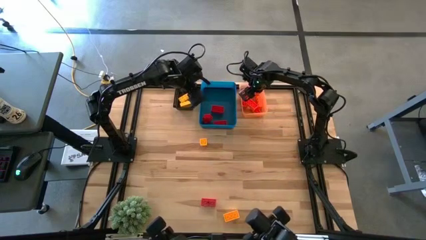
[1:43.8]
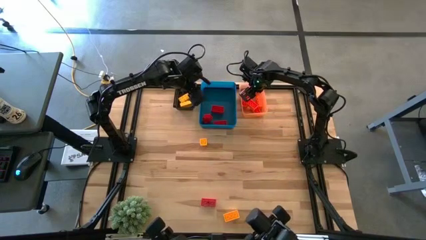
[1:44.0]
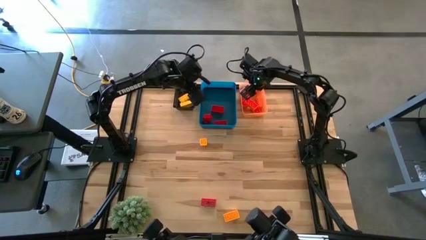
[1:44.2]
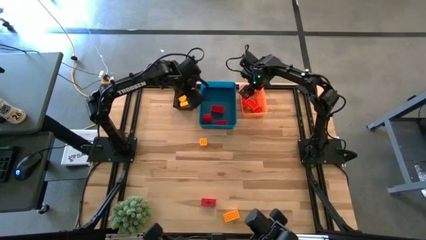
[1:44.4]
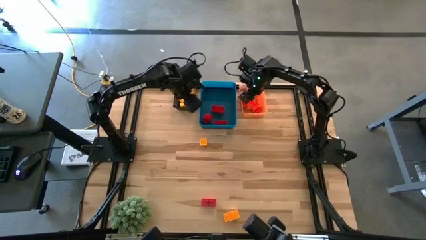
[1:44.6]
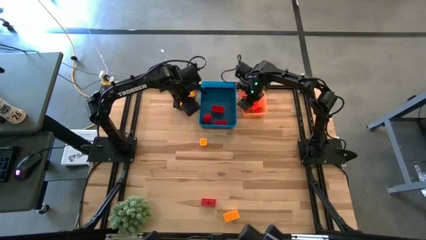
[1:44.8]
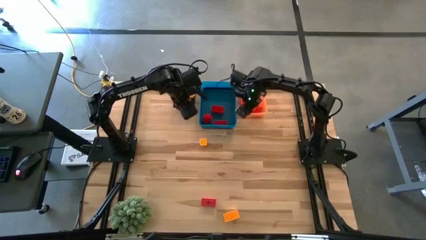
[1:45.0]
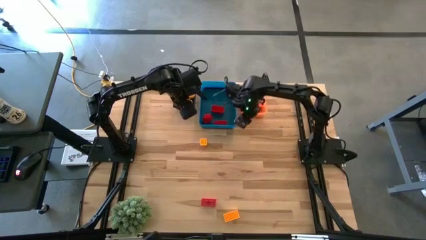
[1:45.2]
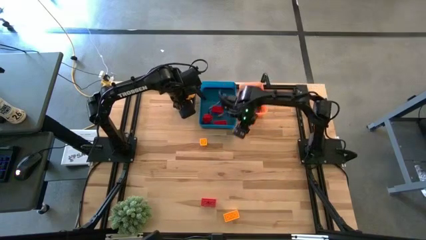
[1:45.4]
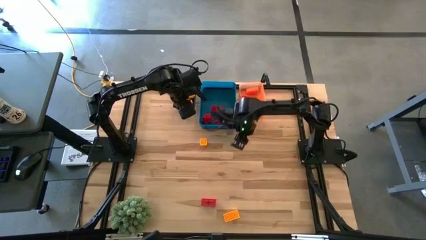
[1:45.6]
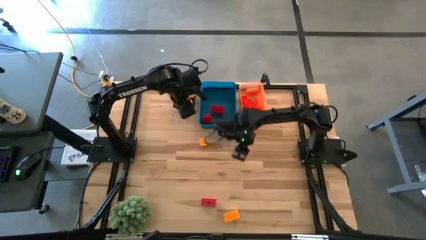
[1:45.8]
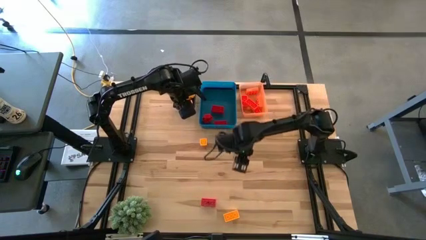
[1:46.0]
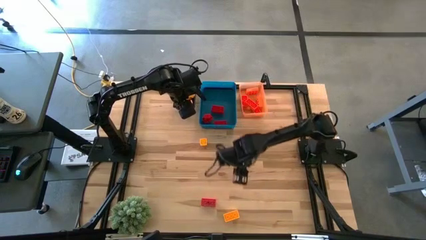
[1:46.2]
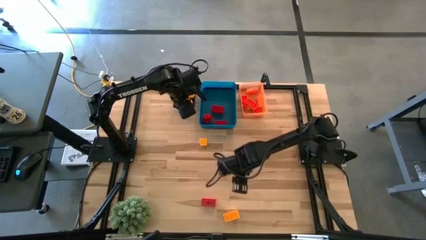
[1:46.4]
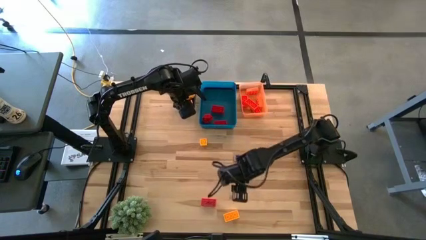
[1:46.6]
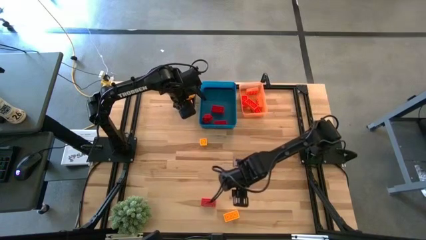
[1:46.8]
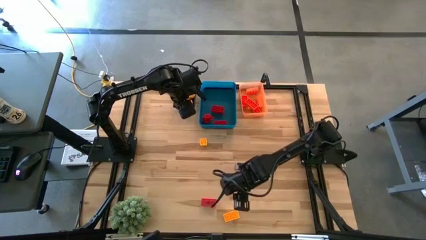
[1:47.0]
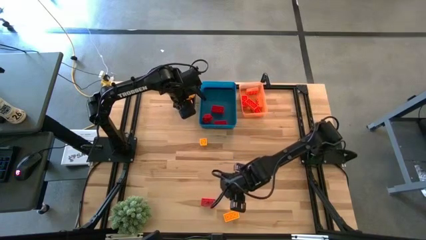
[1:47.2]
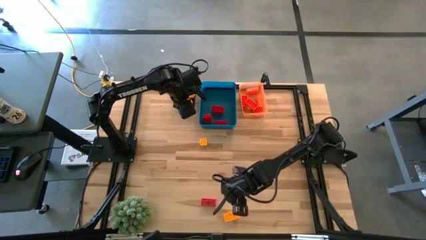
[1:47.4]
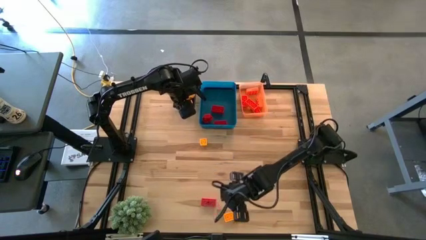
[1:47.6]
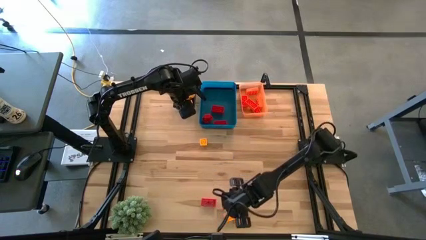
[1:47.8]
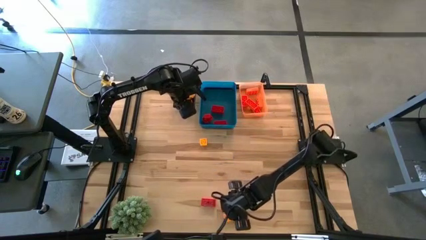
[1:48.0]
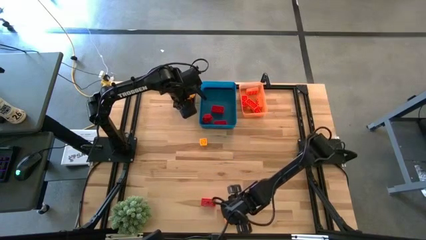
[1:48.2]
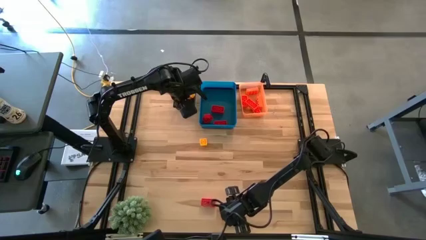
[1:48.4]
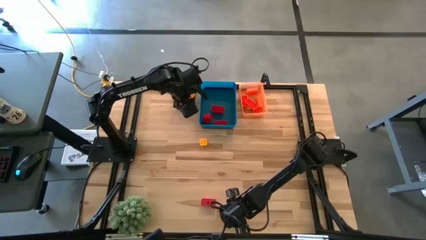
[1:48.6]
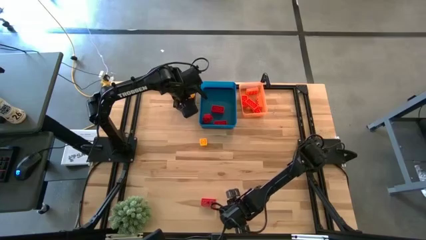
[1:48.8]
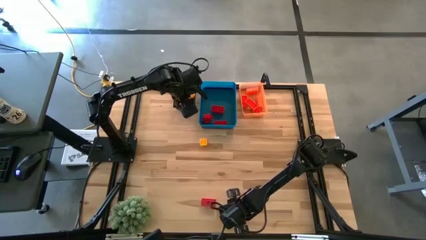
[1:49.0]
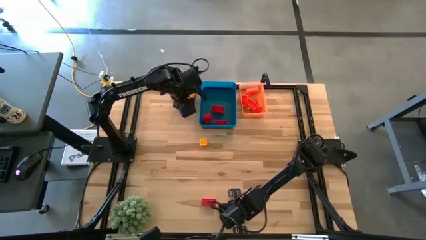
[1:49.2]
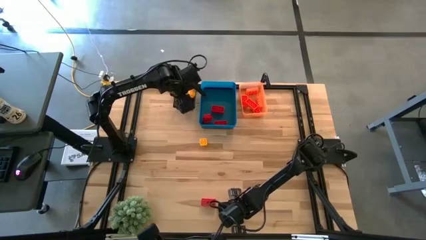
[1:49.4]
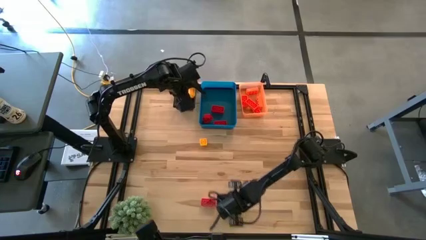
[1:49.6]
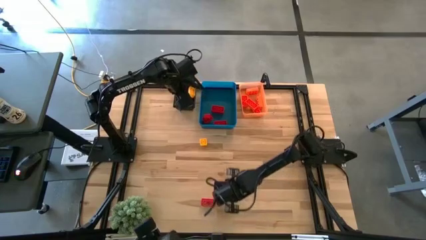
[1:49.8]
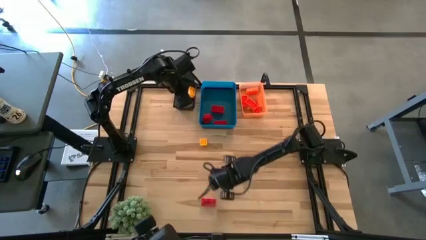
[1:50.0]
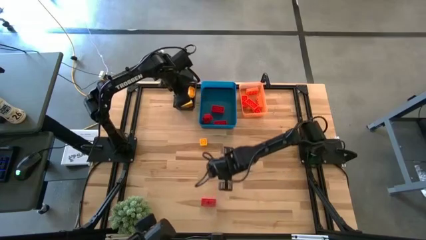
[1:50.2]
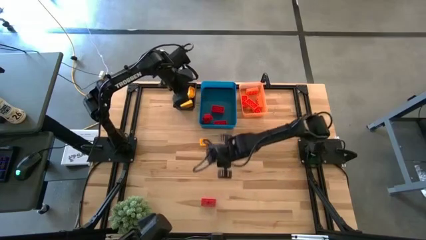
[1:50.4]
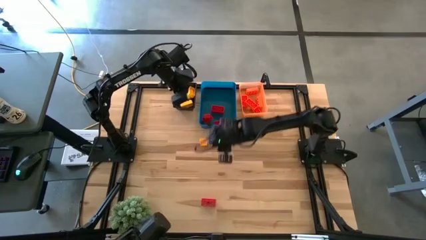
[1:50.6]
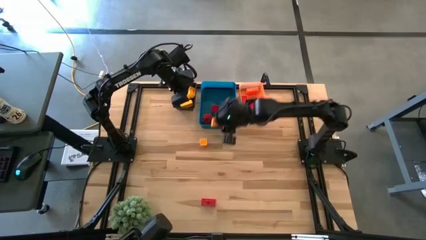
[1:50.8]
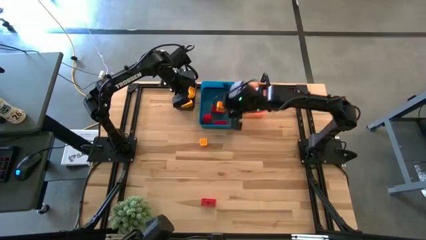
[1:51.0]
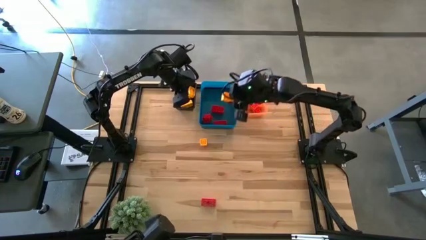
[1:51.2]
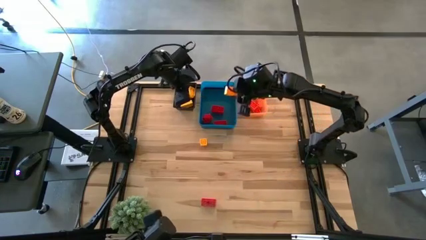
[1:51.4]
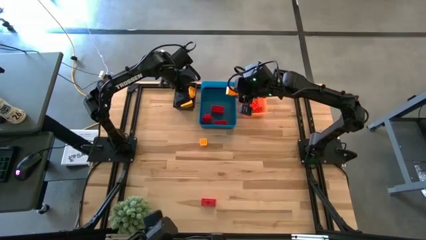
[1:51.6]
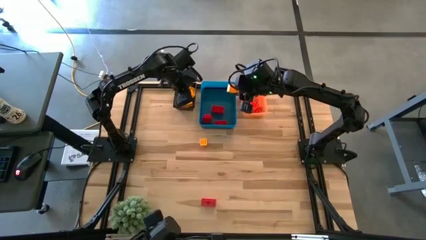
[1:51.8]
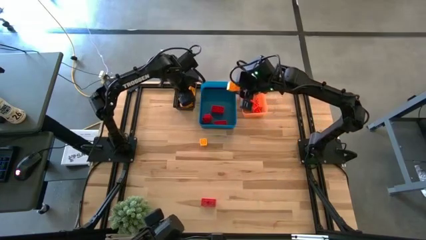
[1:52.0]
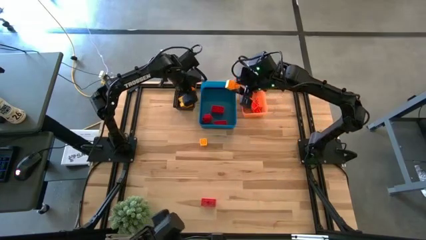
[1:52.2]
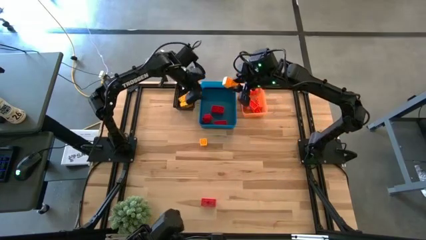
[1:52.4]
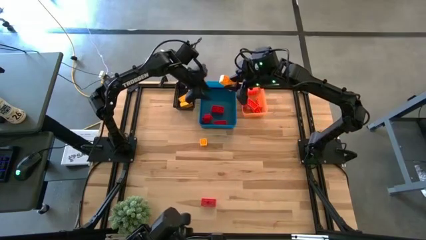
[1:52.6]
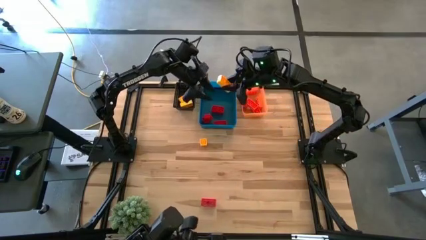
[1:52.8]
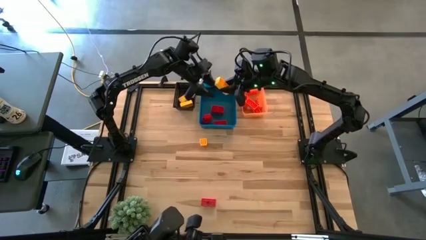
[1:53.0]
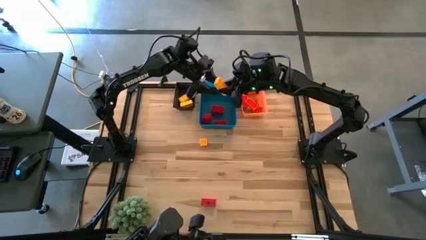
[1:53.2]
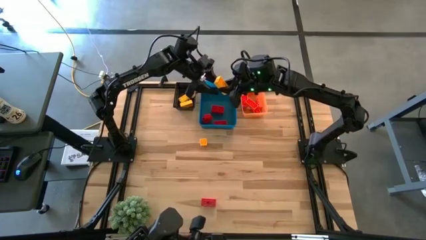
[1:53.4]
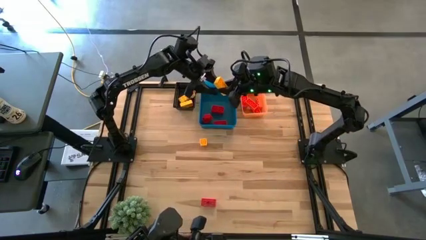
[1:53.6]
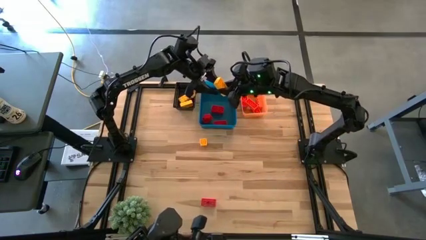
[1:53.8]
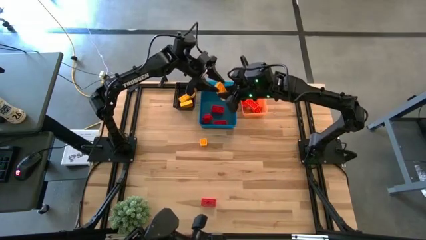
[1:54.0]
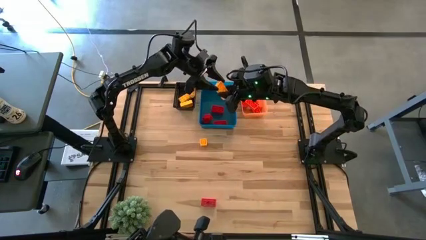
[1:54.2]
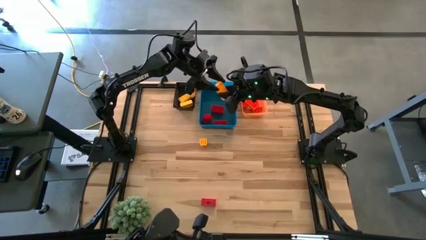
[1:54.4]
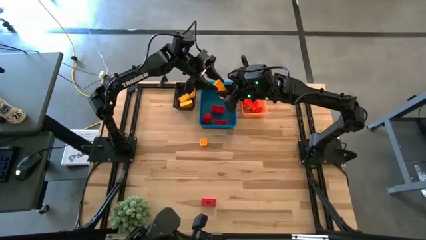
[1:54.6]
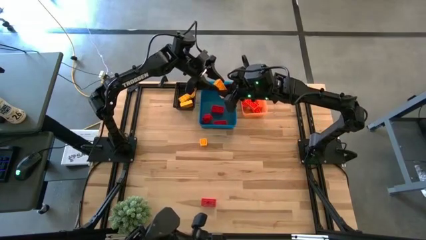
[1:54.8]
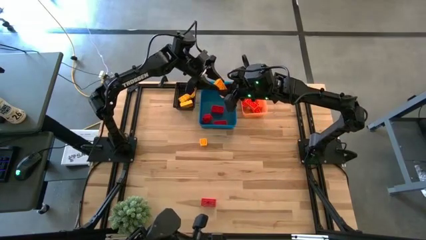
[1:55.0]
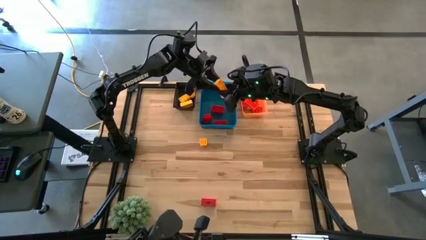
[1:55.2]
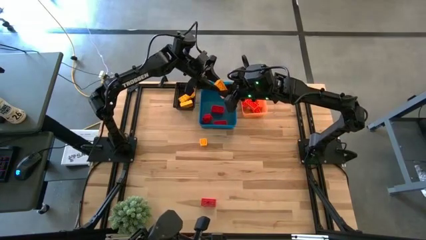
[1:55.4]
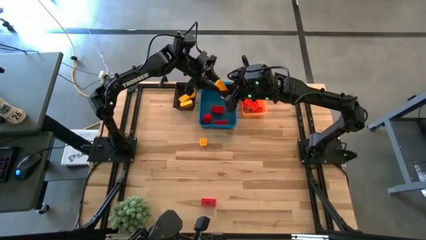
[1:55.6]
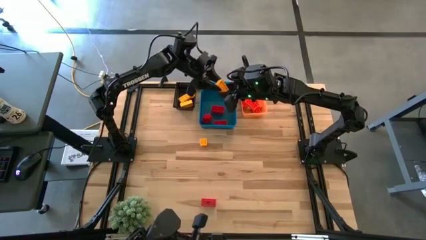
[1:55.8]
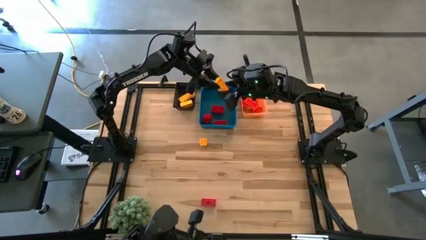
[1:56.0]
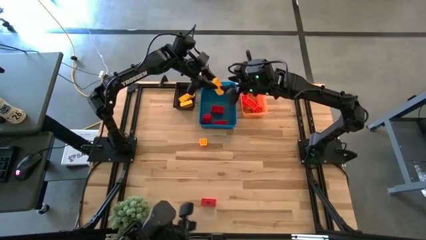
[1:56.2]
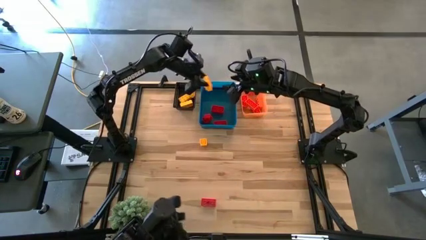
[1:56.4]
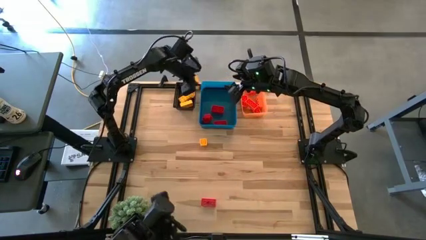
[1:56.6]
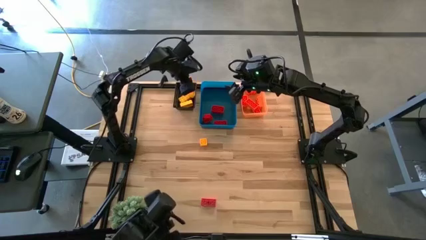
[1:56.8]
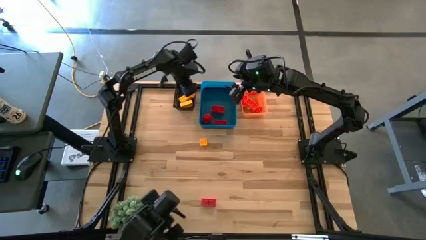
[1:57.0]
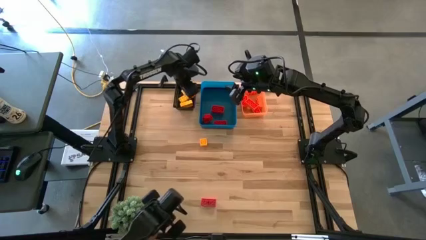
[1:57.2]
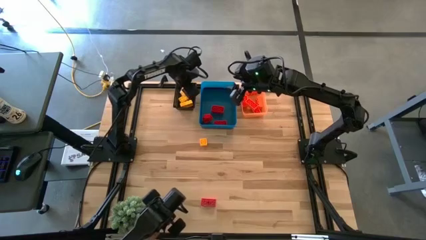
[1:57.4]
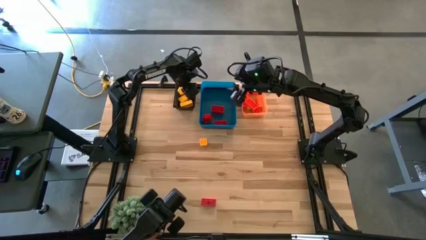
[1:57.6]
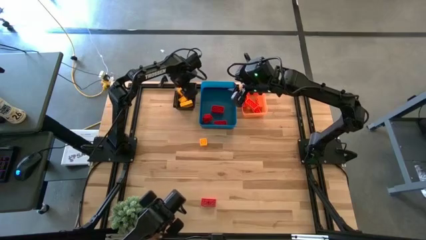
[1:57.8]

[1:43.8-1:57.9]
Task: Sort & place blocks by color
Put the yellow game piece into the black bin
